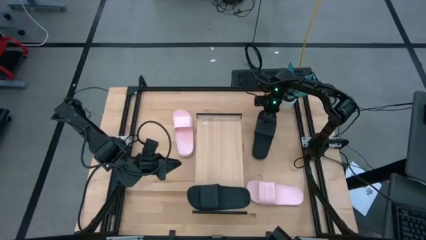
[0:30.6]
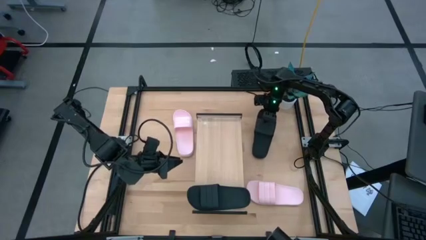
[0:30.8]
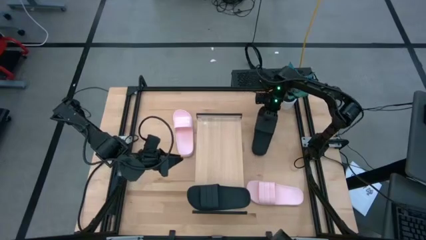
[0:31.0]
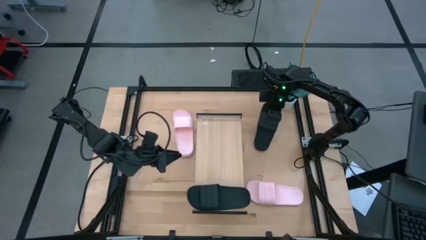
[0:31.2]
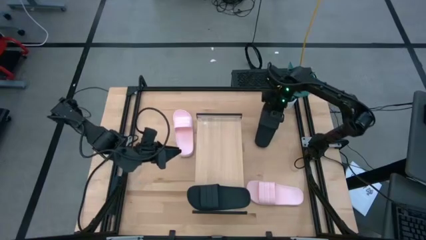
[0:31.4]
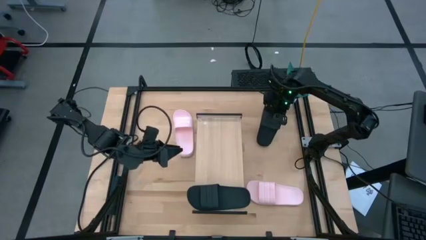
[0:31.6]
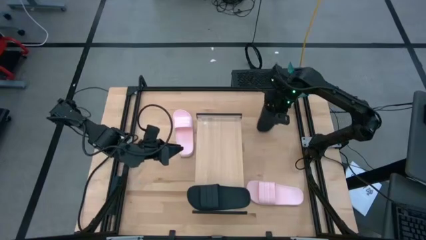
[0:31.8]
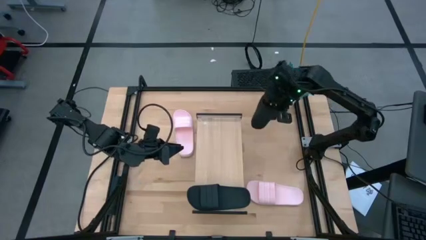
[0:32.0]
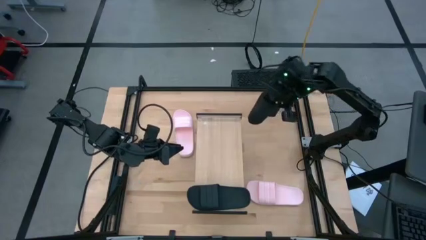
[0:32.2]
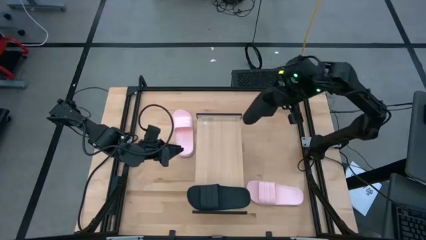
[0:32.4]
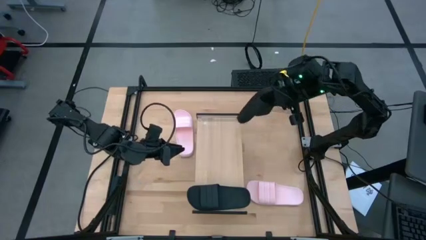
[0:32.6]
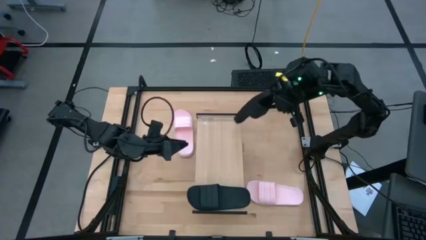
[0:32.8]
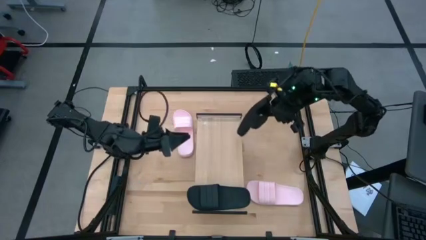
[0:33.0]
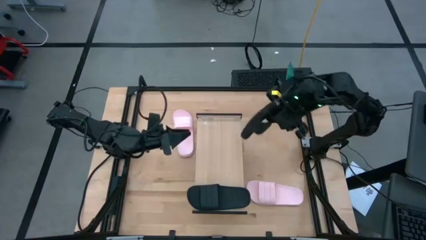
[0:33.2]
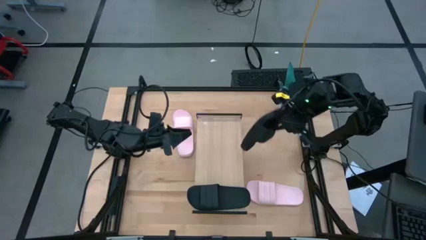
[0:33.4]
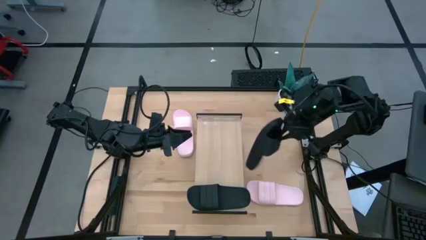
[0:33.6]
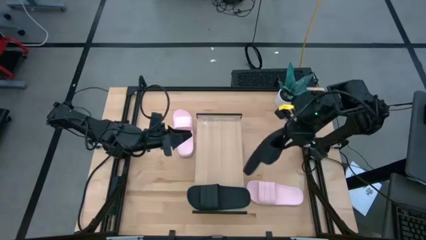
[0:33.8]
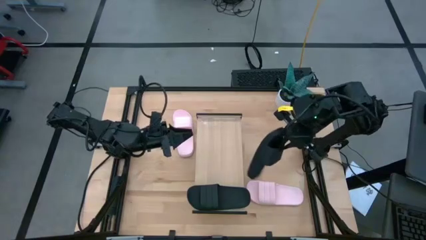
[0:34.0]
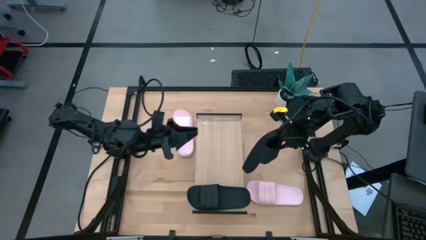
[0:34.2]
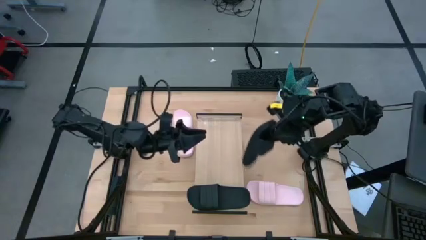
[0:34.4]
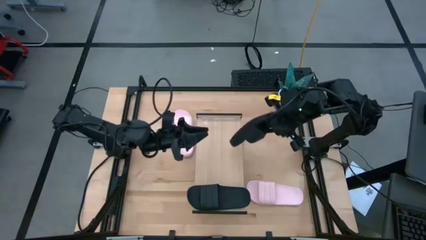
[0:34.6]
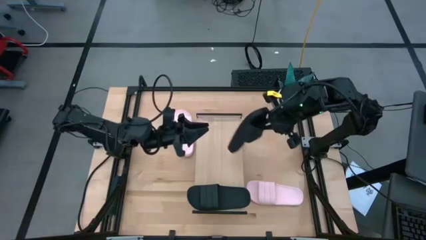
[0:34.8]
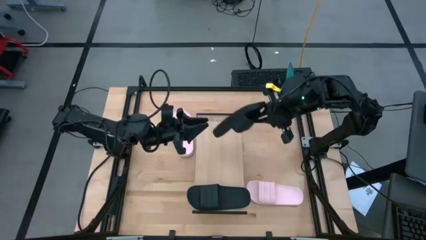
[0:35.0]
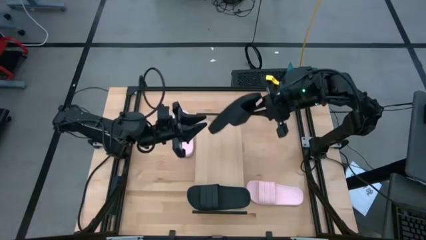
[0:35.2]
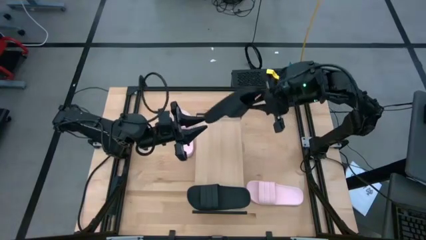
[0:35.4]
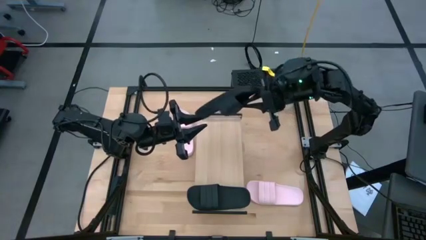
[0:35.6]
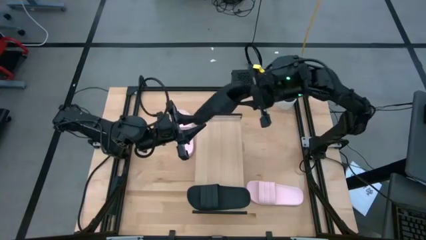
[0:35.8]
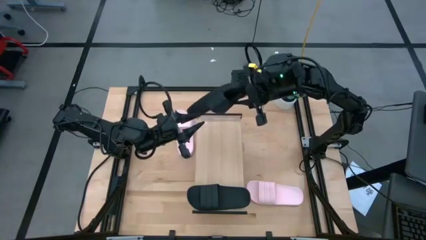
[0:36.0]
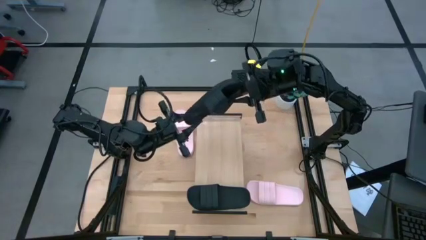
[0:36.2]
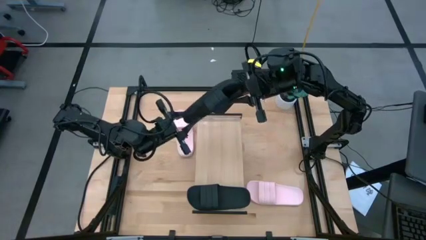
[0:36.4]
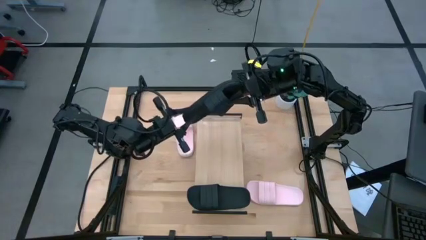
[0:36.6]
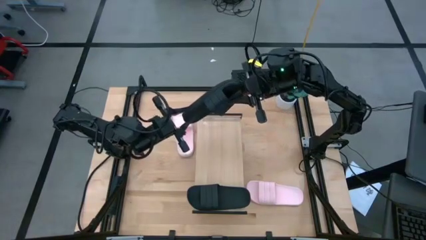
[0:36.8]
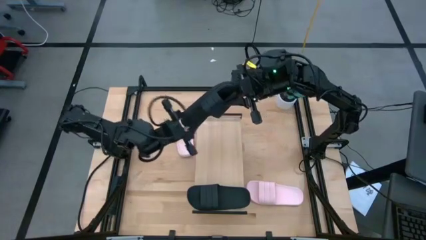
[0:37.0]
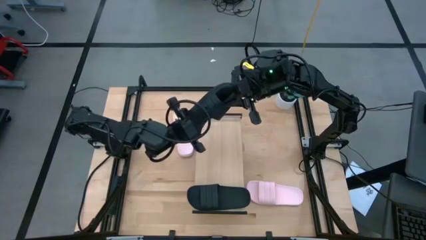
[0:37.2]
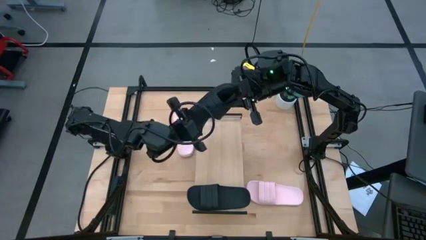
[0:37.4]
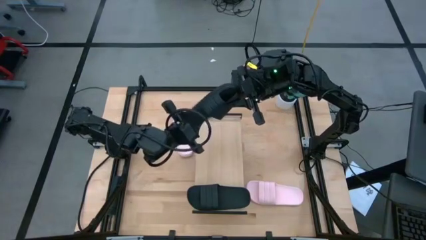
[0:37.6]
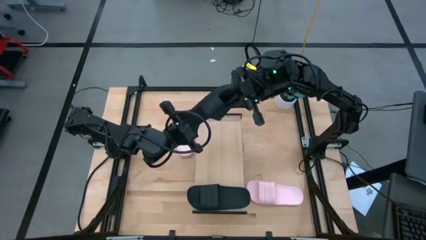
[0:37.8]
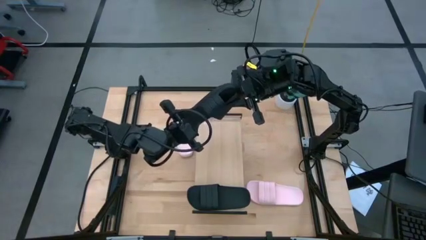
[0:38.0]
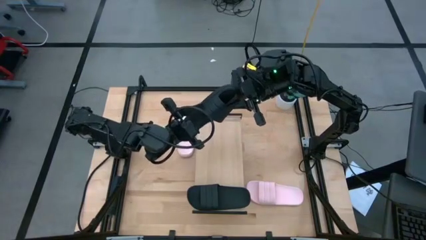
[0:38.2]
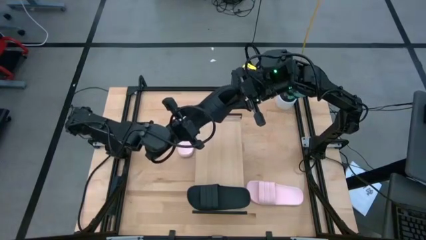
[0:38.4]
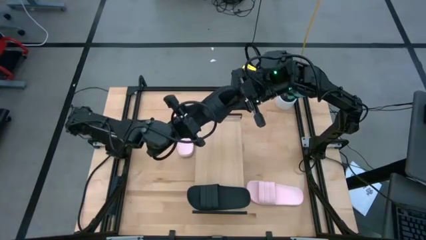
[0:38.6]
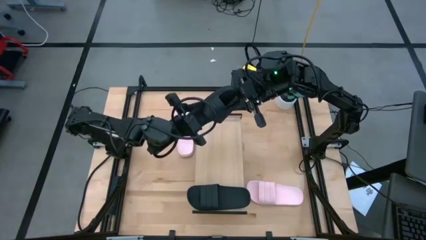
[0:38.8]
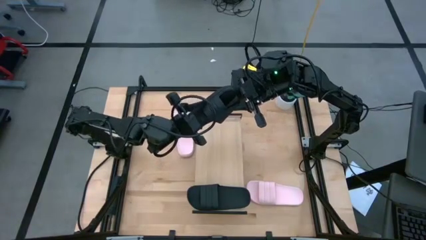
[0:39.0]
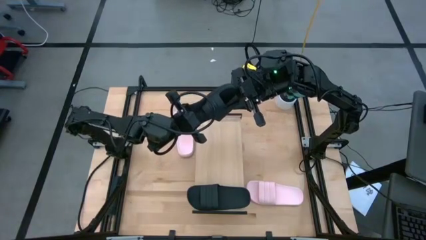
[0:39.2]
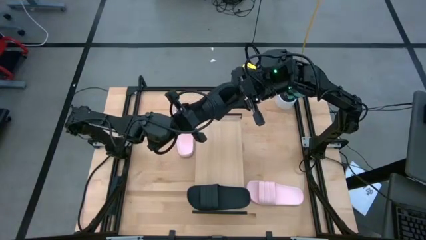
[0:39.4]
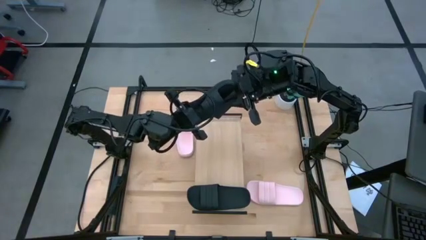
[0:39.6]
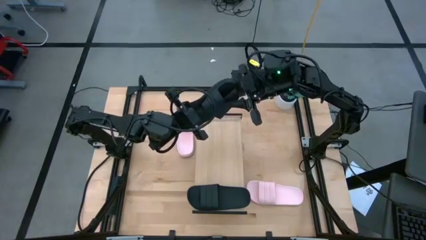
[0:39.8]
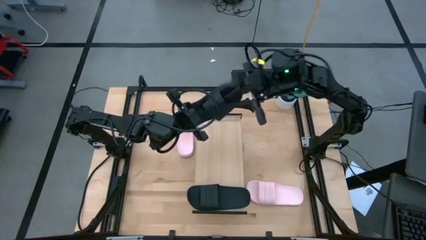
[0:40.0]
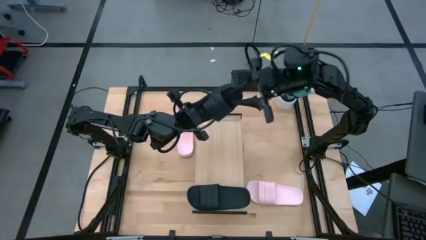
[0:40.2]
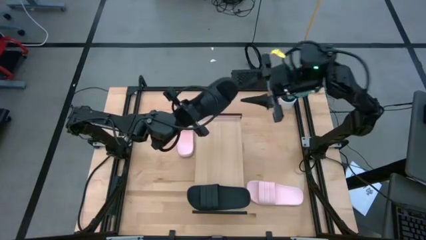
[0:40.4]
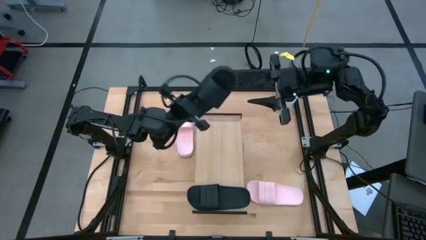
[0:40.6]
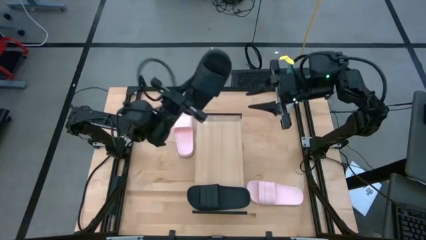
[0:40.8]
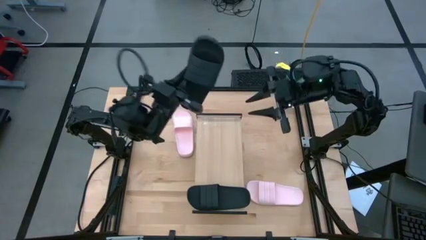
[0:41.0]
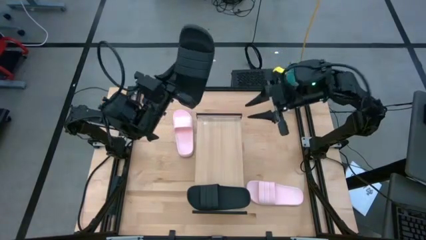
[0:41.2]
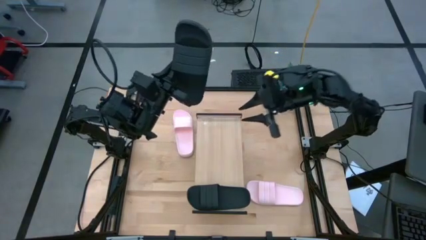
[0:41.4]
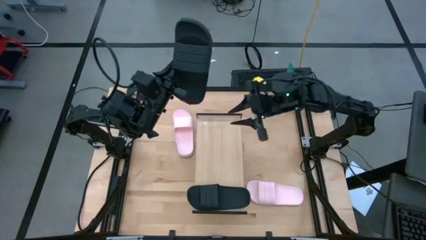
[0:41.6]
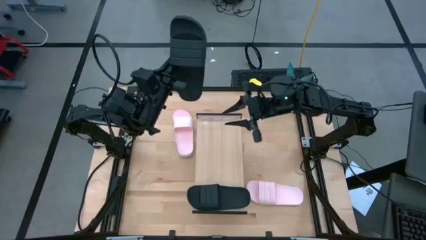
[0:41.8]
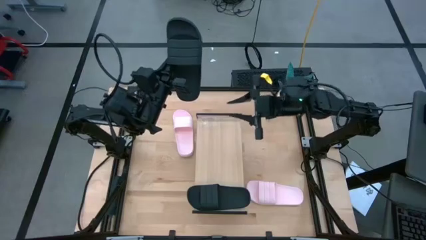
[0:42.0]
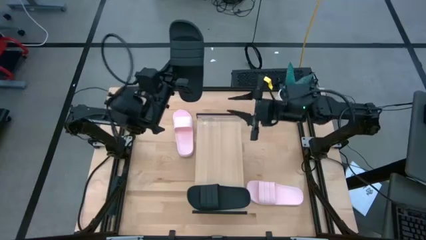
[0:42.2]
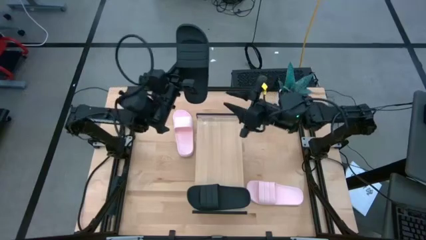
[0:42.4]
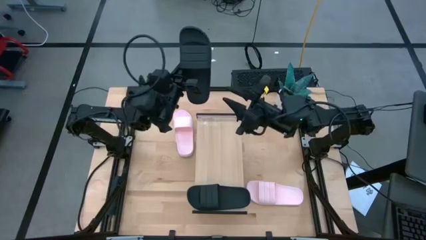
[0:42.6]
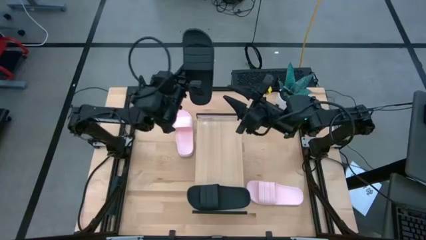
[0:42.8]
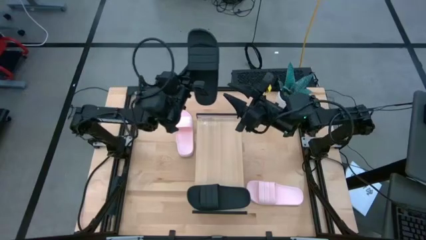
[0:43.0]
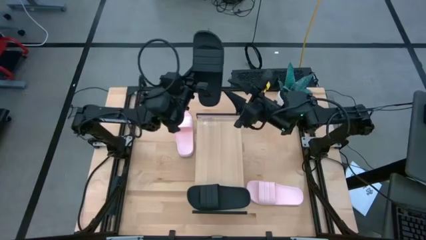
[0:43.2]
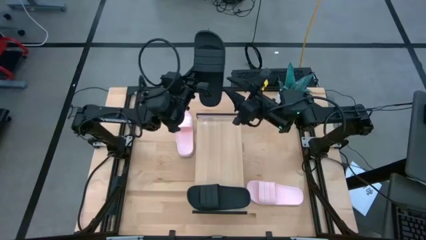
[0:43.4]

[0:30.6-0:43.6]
Task: Pick and place slides into the shelf
Put the black slides on the shelf
